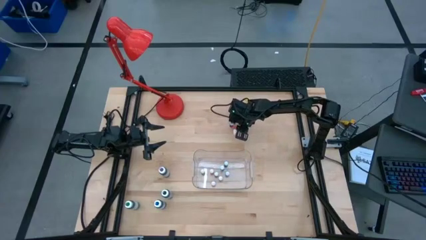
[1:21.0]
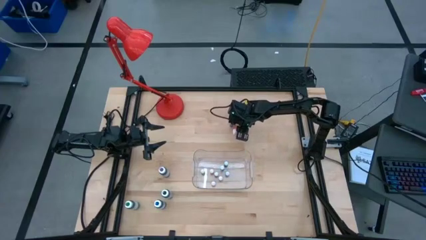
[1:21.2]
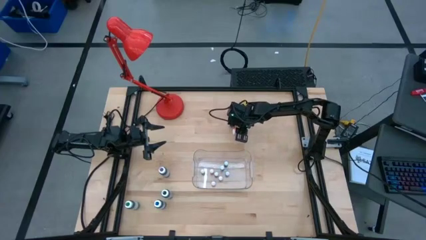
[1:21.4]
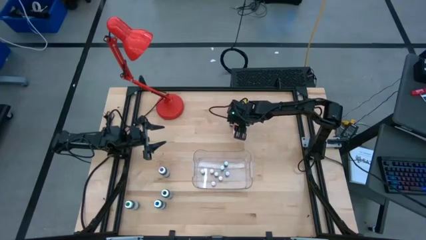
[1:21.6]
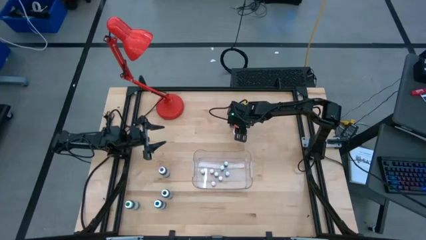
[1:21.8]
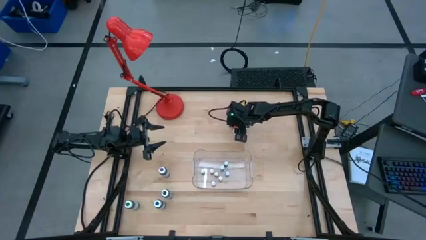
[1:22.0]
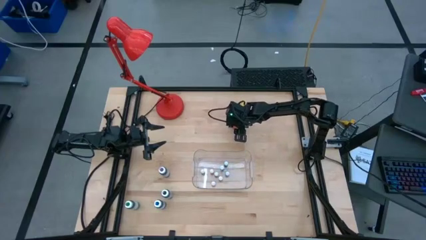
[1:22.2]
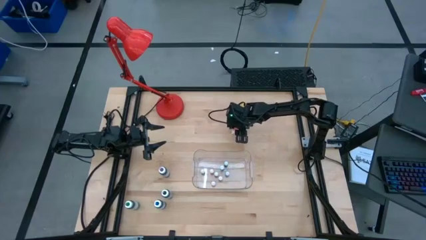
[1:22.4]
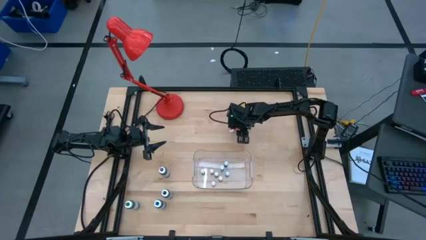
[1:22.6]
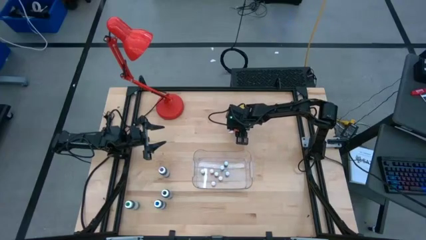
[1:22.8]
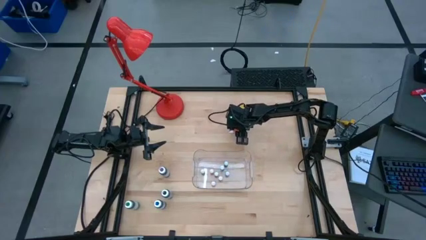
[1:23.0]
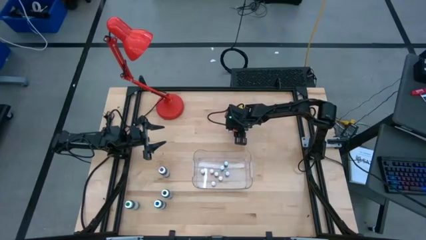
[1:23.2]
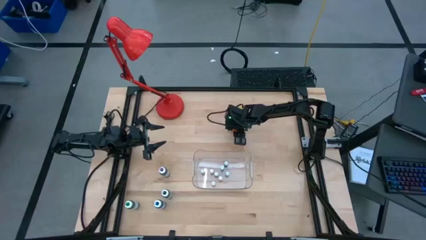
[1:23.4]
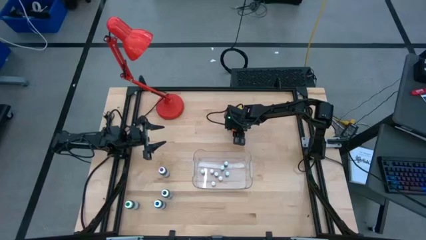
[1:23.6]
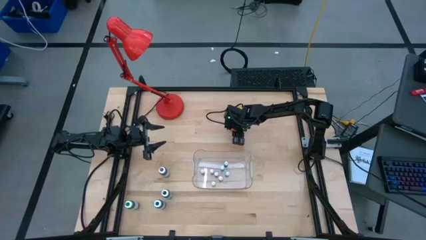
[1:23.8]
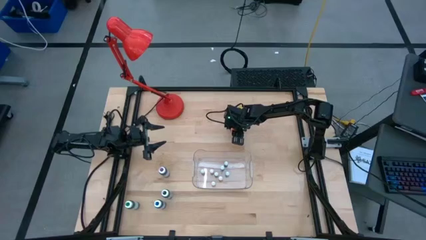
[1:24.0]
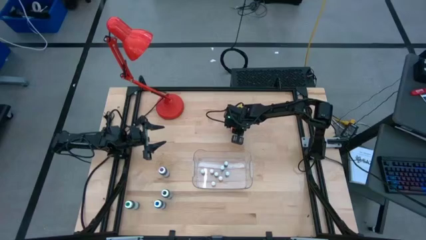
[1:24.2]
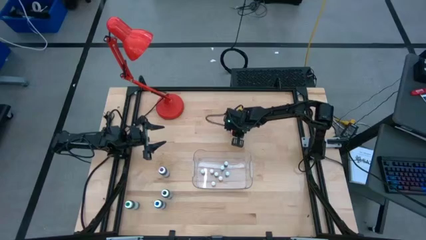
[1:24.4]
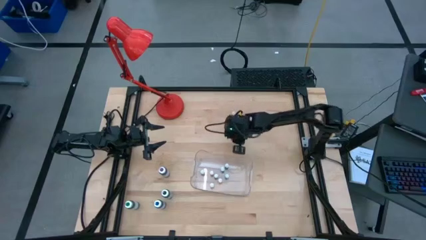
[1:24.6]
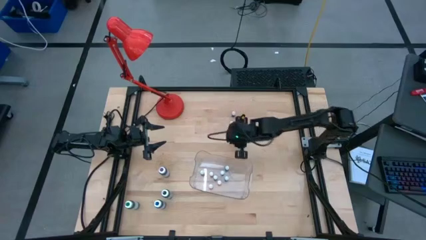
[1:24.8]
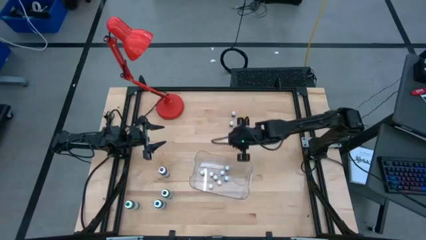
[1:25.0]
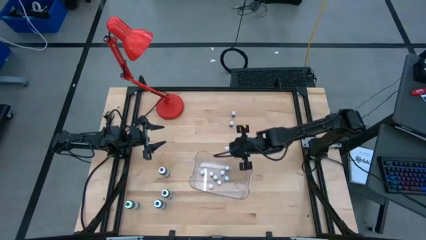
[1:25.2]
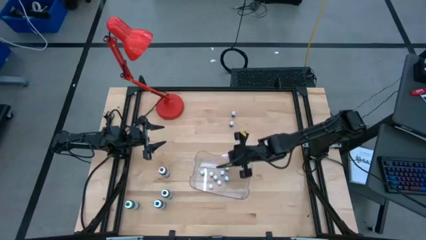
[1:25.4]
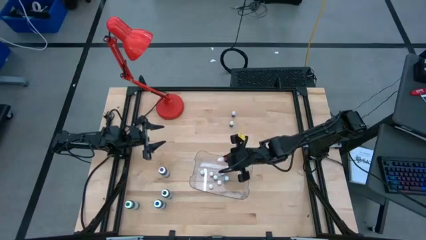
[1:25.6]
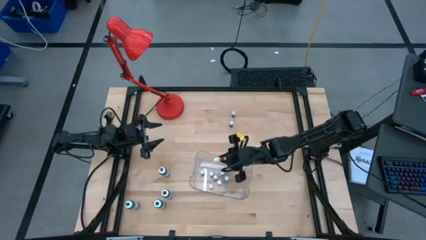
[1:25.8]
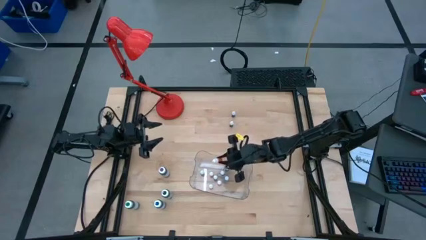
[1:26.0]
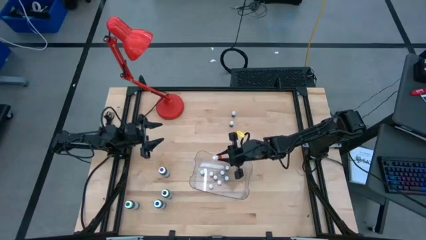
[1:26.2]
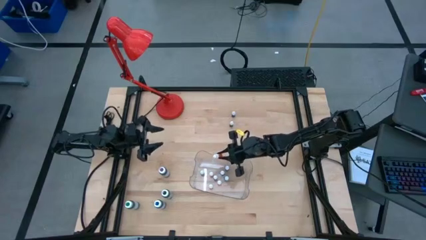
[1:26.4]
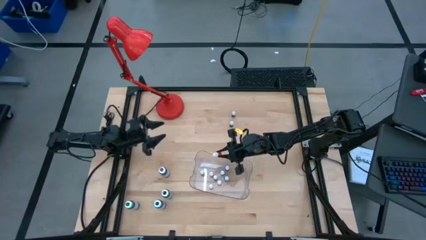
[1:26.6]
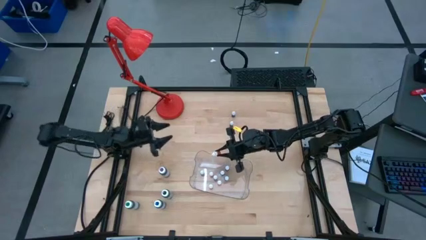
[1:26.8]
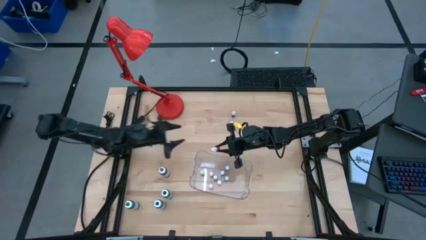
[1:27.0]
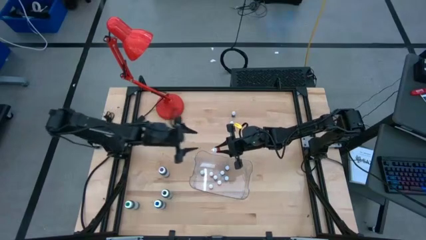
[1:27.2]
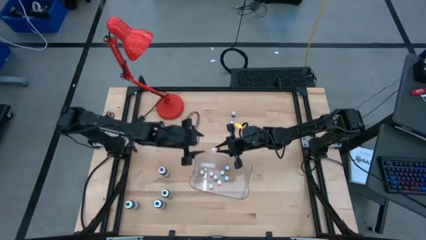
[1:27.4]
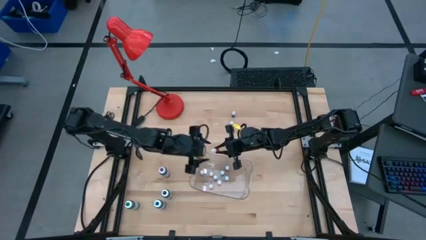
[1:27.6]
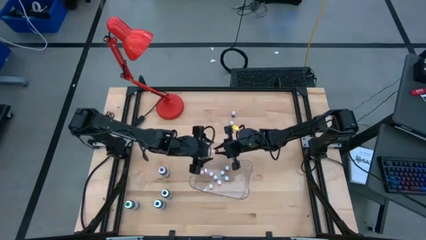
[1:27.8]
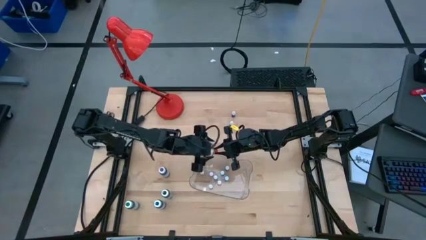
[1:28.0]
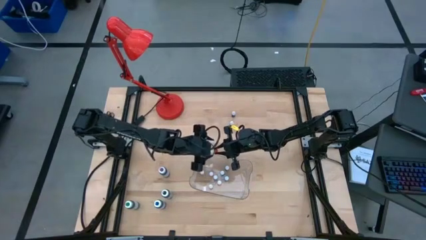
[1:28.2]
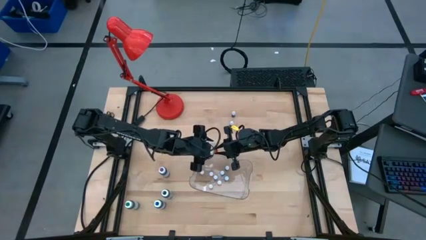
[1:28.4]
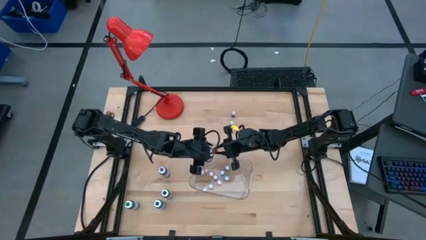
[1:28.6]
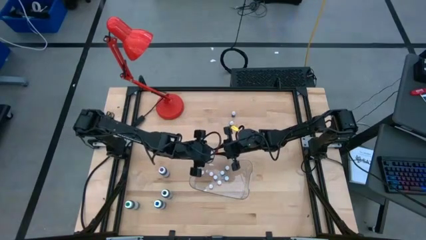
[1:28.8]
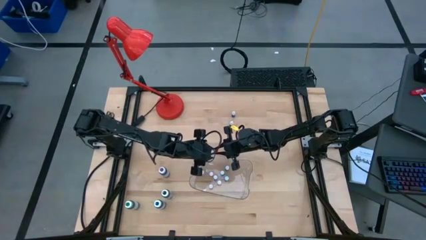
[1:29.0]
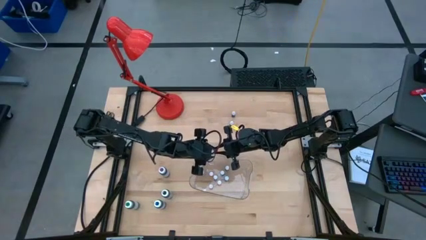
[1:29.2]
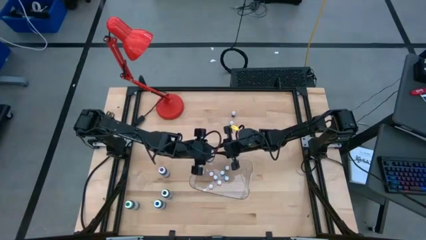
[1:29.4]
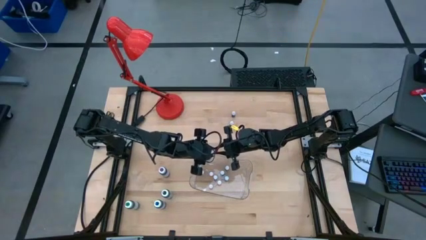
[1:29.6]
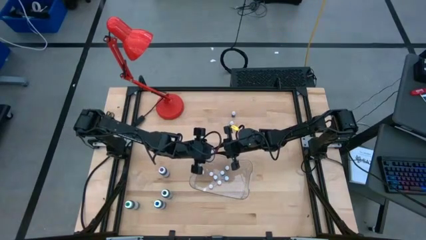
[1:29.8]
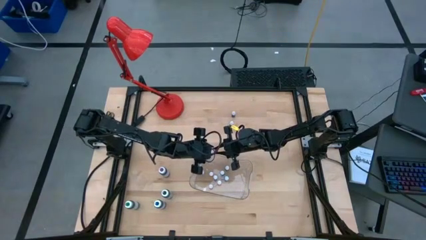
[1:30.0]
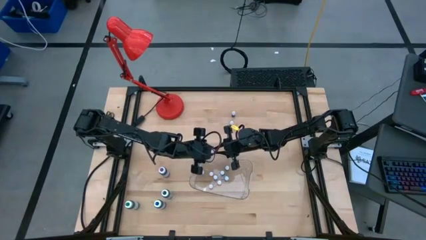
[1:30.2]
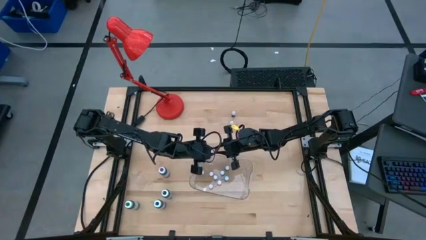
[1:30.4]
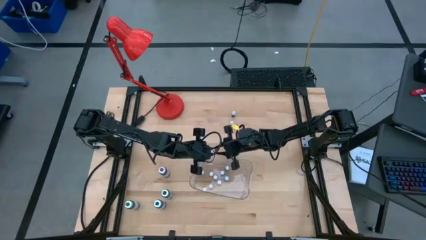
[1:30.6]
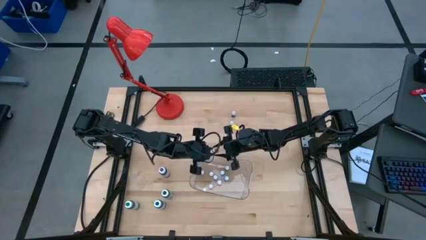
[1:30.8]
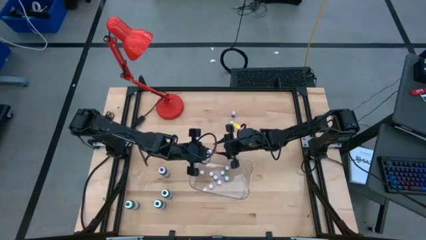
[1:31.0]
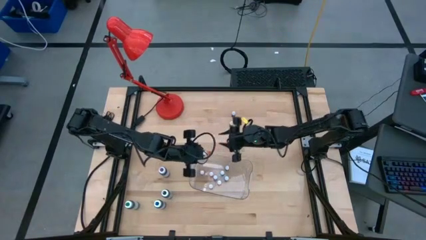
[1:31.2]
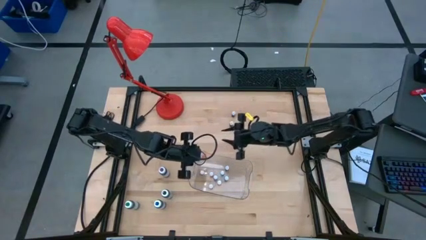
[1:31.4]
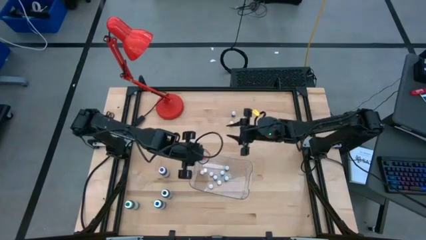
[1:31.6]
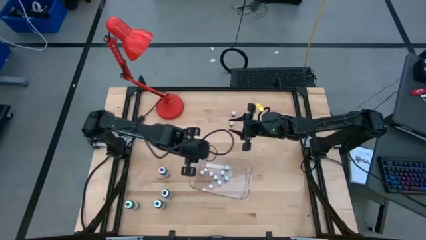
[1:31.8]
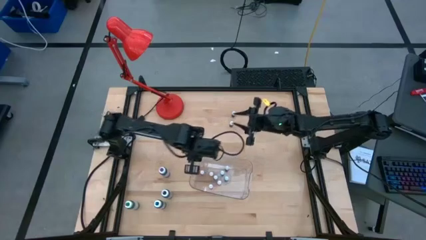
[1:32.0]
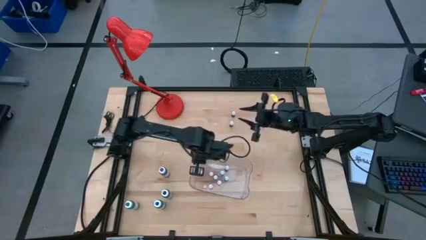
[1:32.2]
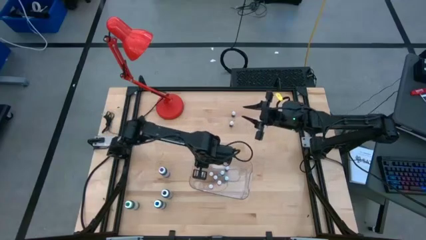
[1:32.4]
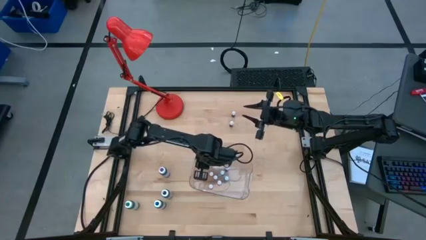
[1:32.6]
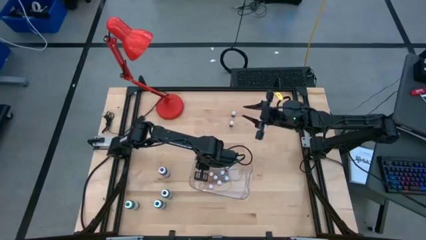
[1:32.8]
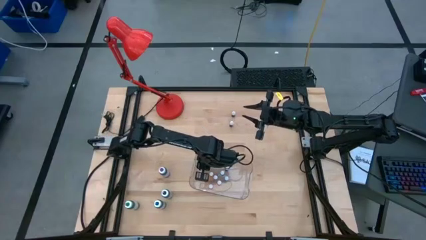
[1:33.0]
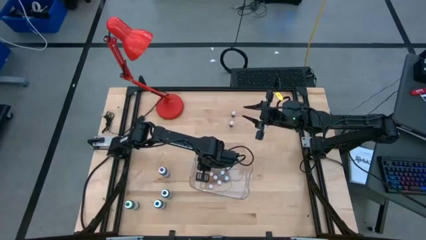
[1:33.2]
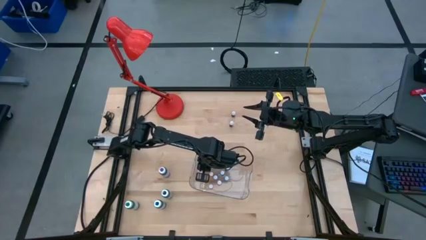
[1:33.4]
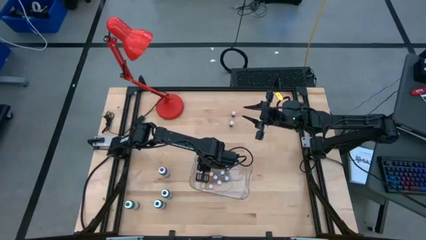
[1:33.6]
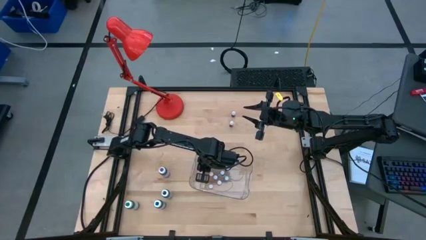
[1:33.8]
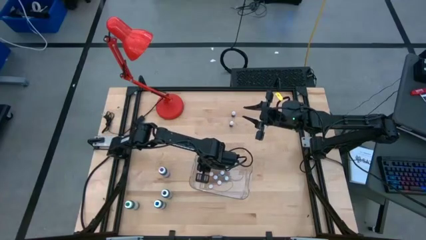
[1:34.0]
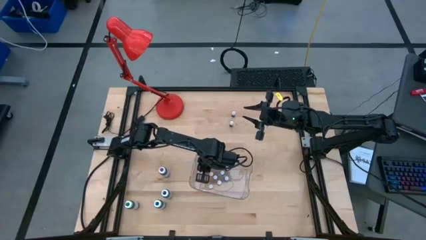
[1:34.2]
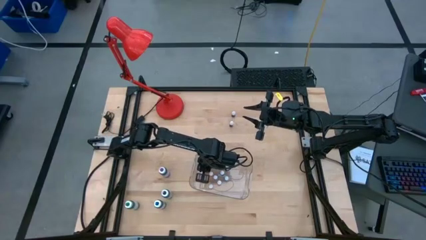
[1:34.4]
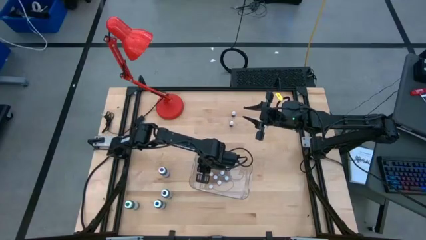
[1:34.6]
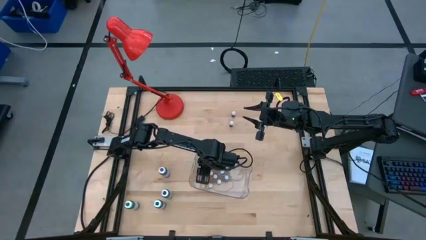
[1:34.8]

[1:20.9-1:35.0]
Task: Pick & Place food coloring
Put the orange food coloring bottle into the transparent bin

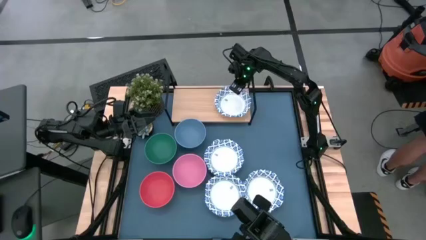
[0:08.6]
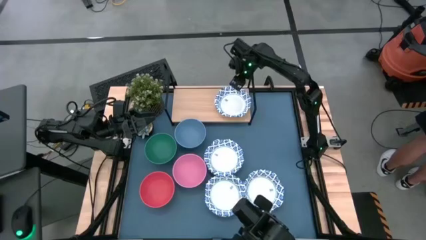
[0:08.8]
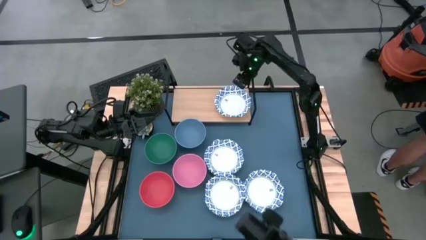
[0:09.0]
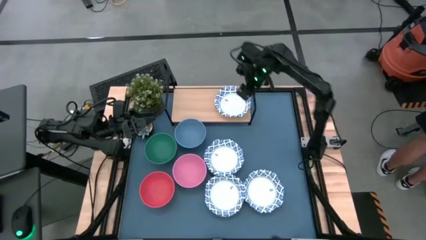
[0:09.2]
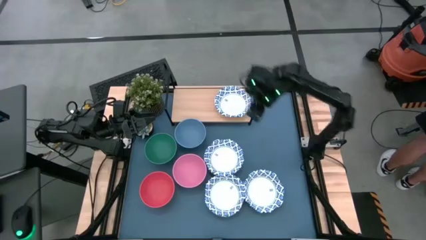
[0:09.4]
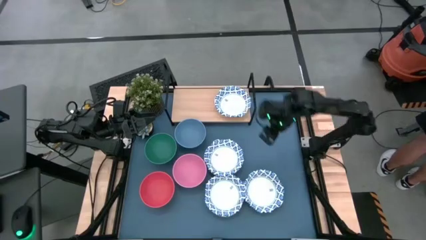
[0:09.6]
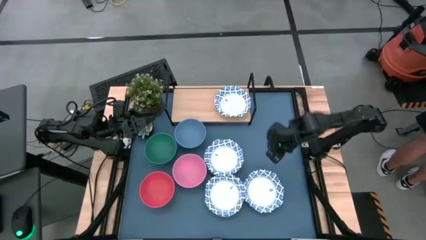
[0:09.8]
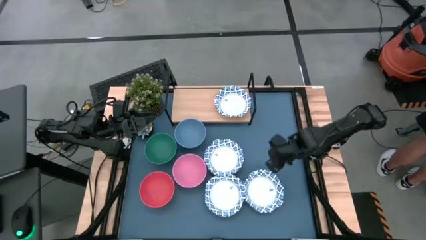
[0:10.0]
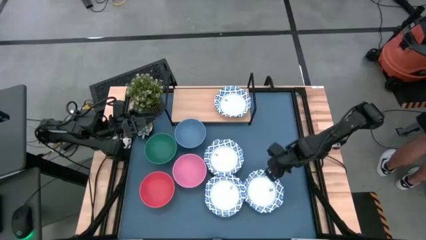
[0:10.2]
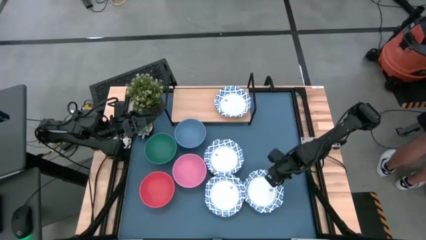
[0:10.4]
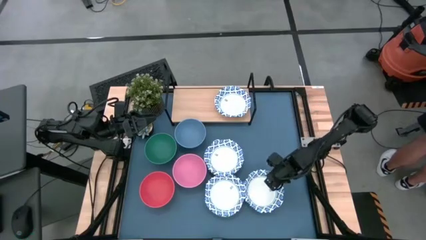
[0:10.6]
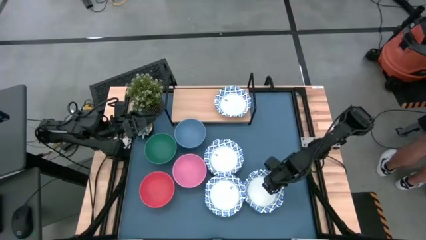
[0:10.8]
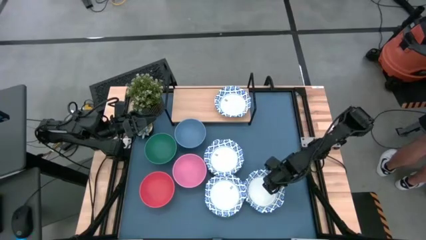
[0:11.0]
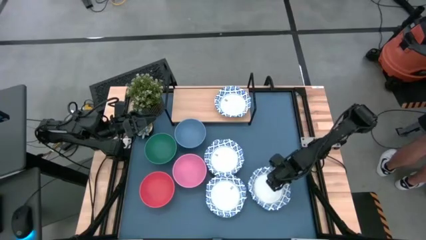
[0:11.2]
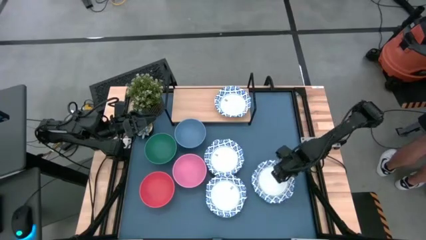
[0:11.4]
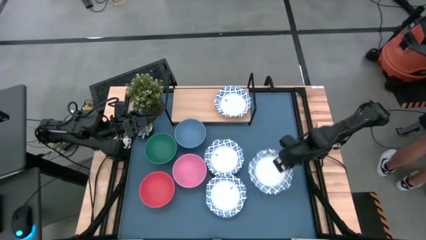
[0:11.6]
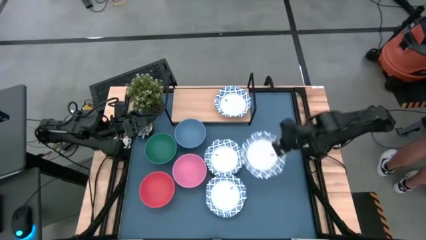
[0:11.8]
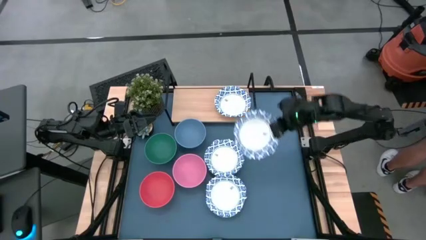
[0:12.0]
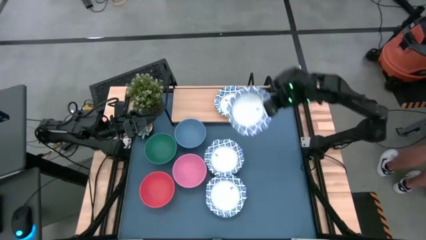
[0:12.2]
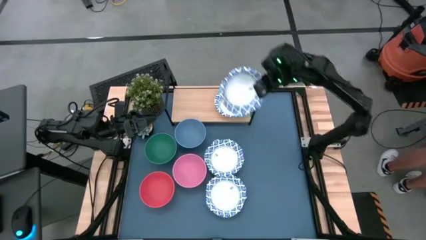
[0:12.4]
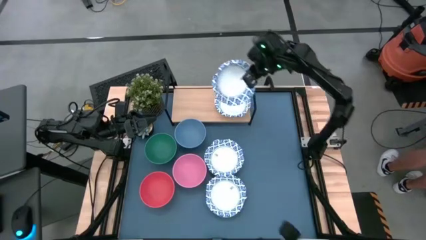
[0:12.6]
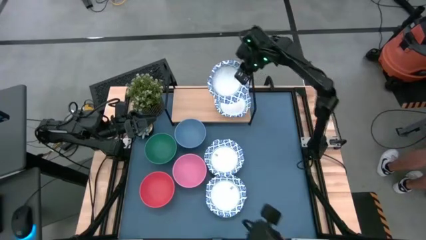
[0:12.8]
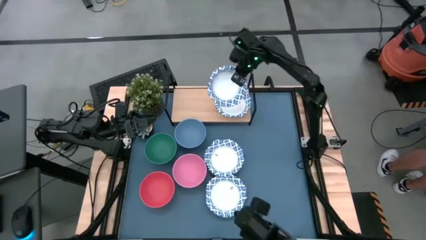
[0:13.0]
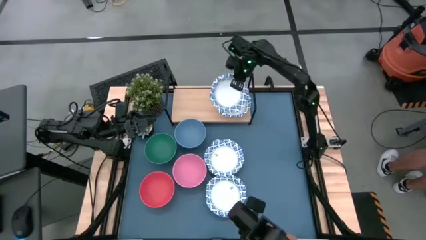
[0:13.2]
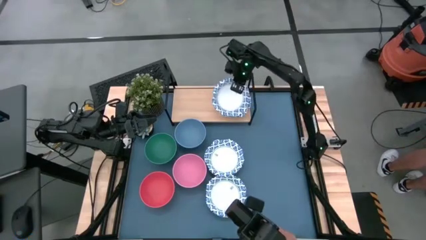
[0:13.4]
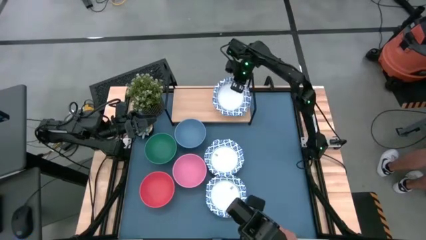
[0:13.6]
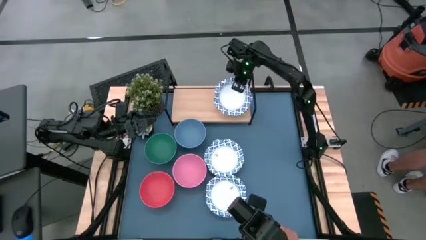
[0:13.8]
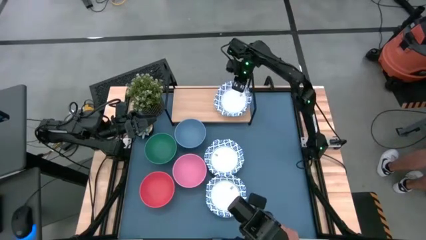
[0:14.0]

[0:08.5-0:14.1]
Task: Place and stack bowls onto a shelf
Stack the white bowl on top of the white bowl on the shelf
